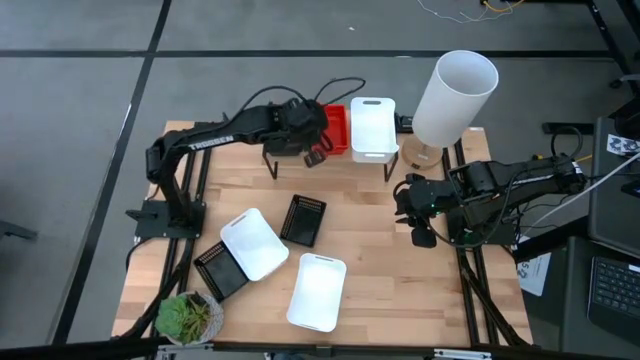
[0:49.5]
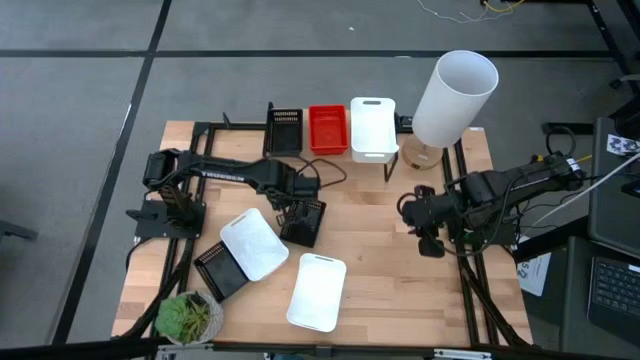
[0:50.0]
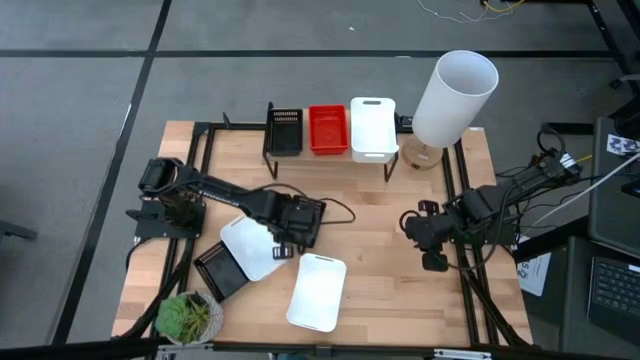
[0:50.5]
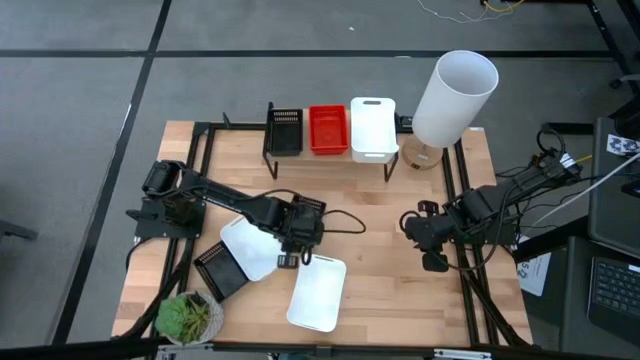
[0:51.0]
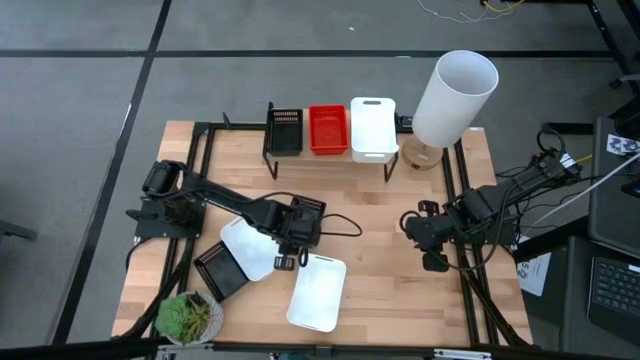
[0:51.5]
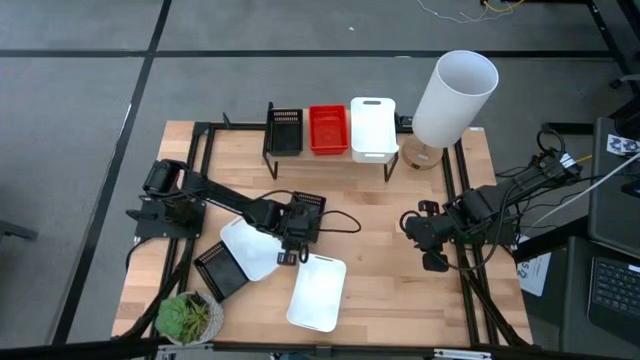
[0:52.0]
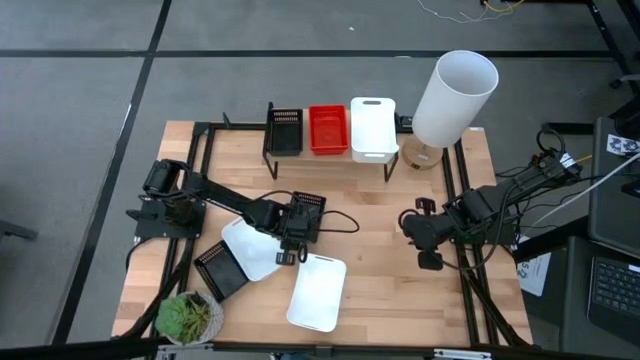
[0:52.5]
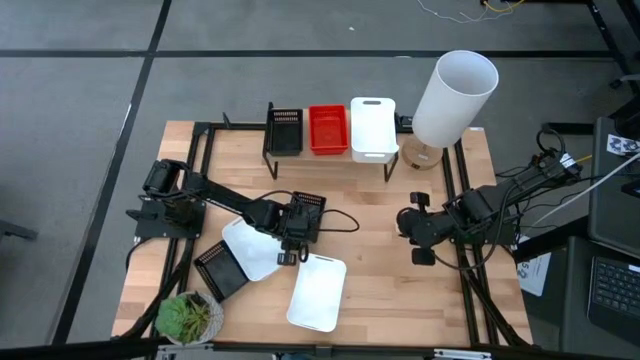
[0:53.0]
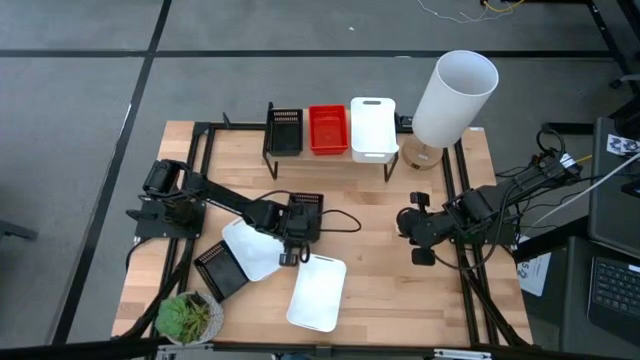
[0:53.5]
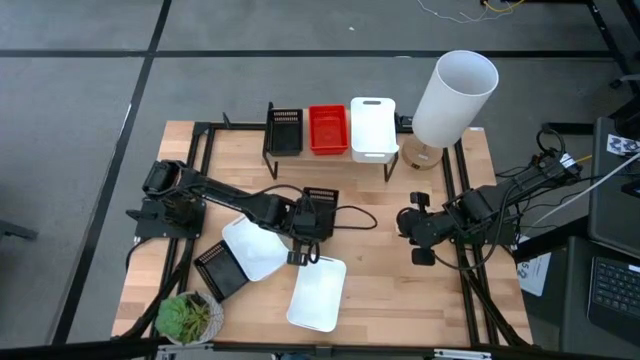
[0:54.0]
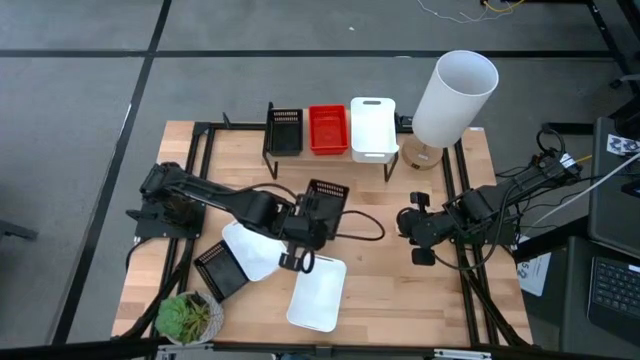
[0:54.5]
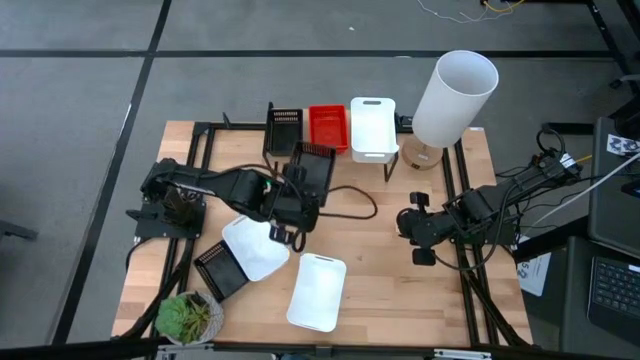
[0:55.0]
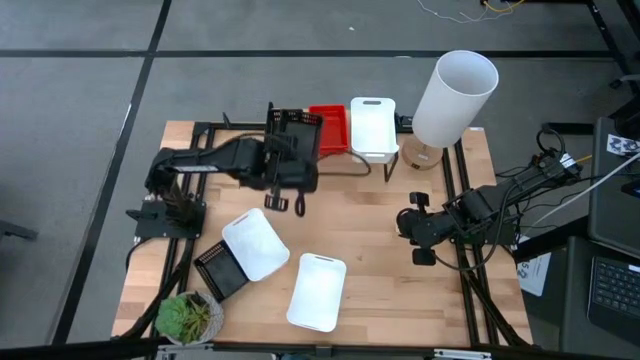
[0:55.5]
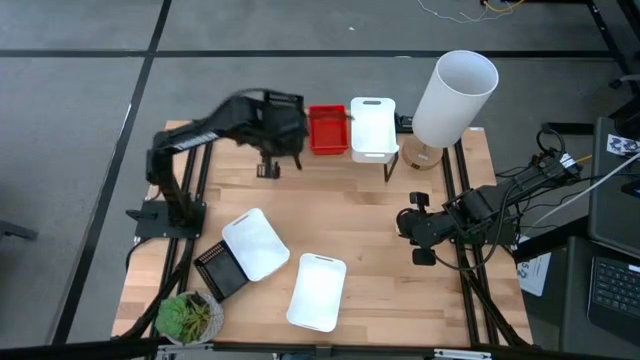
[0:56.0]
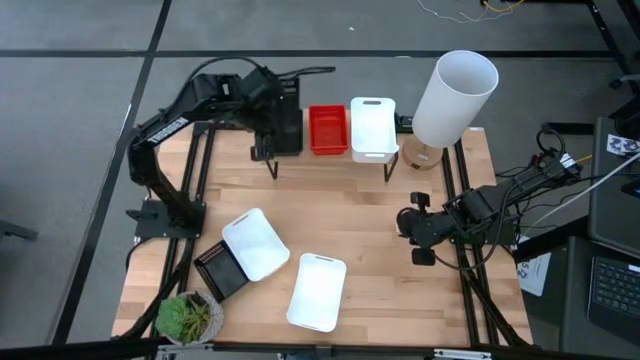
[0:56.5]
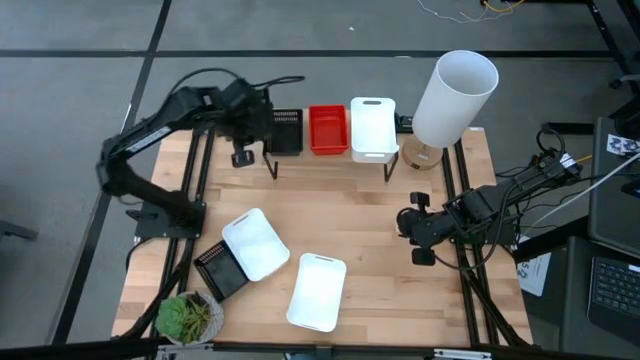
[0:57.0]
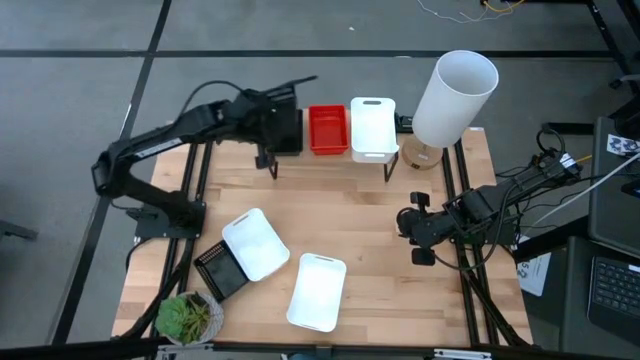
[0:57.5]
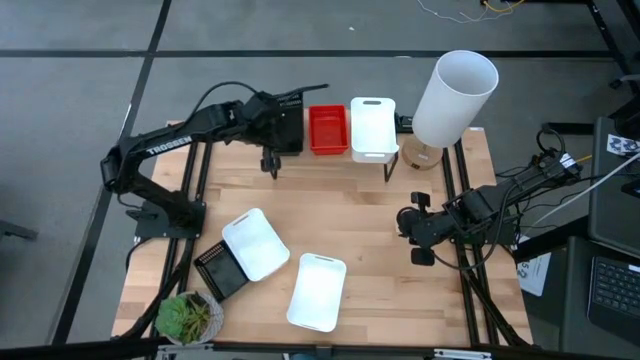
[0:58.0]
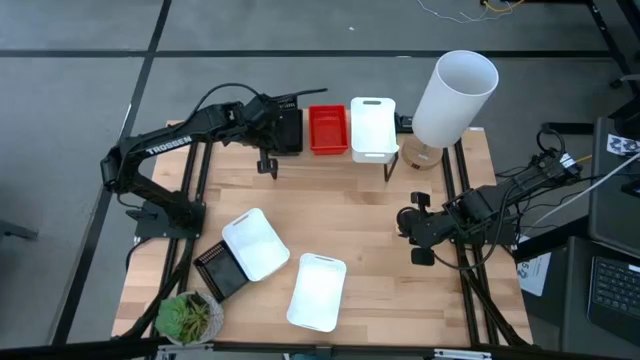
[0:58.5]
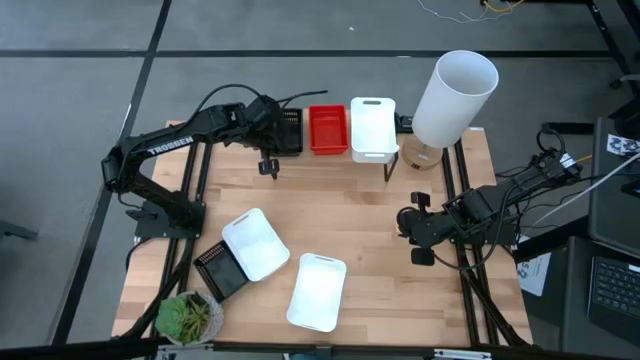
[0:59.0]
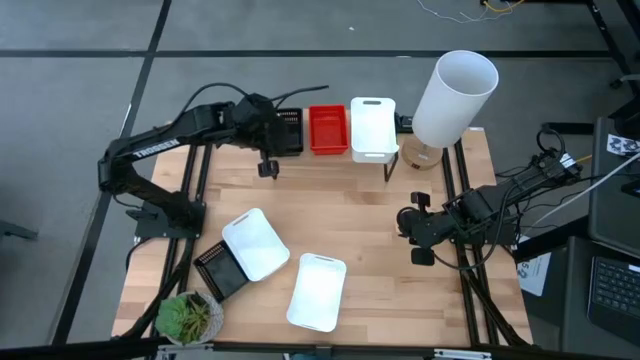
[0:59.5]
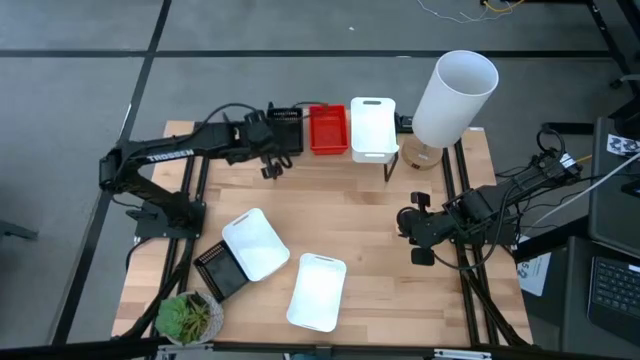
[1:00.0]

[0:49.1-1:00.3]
Task: Stack baskets on shelf by color
Stack the top black bin on top of the black bin on the shelf

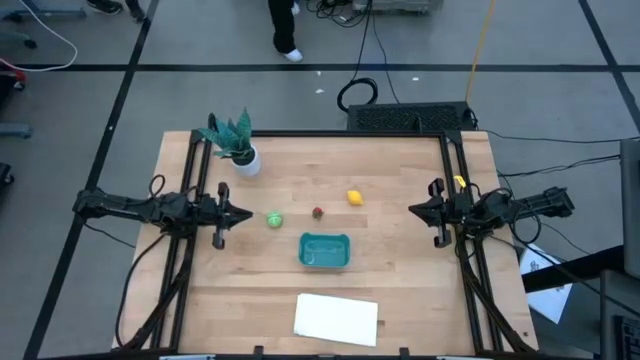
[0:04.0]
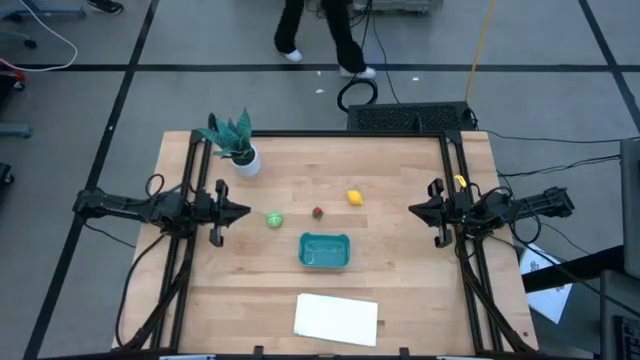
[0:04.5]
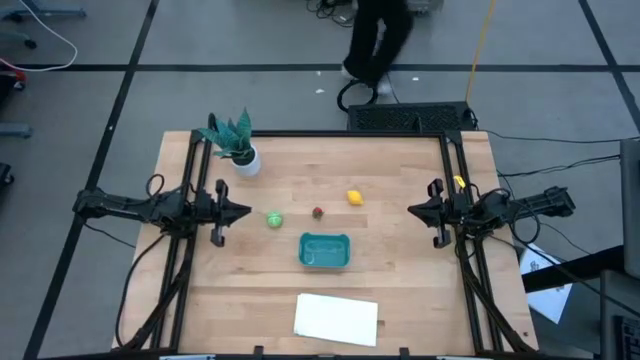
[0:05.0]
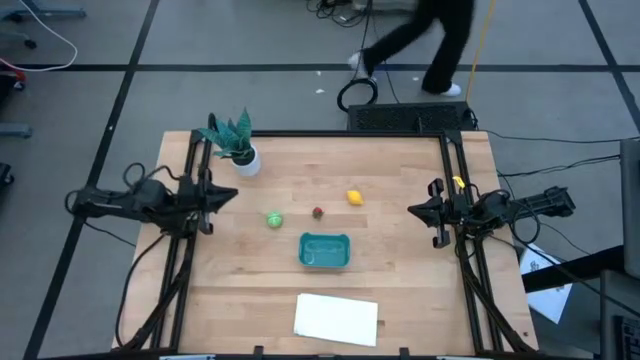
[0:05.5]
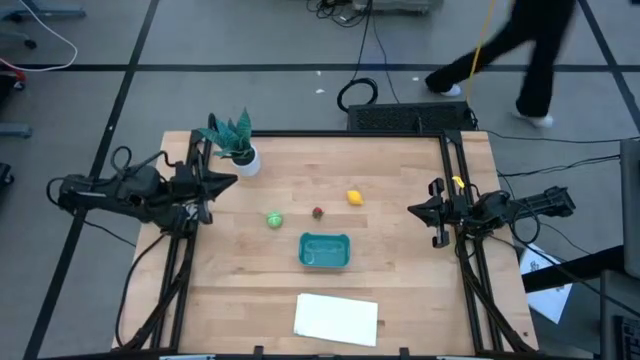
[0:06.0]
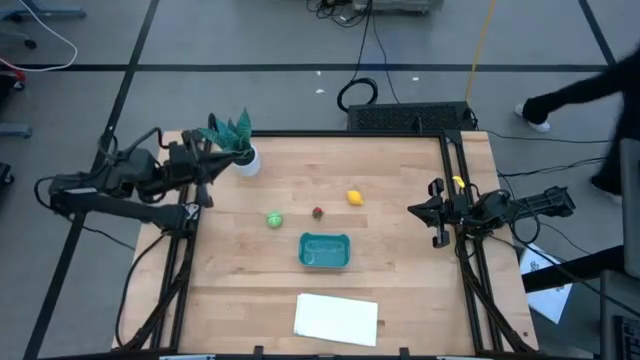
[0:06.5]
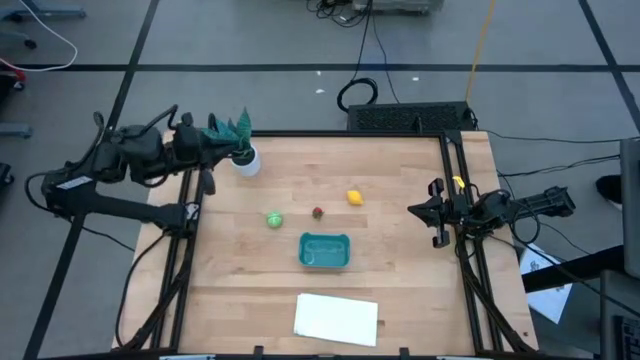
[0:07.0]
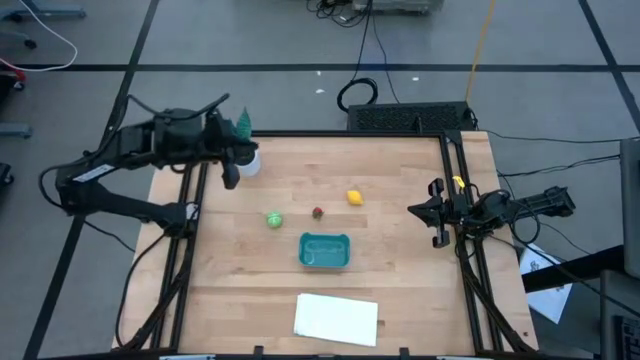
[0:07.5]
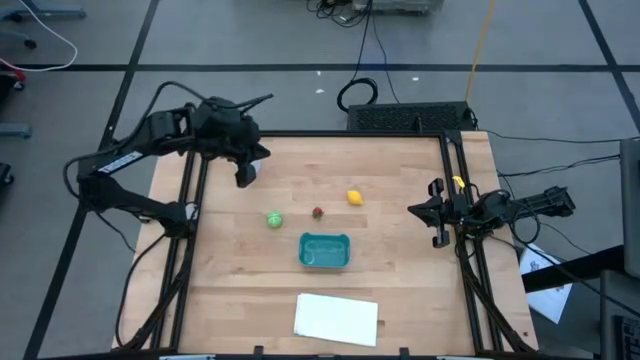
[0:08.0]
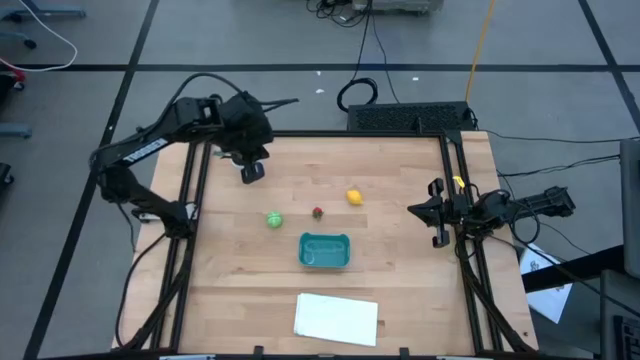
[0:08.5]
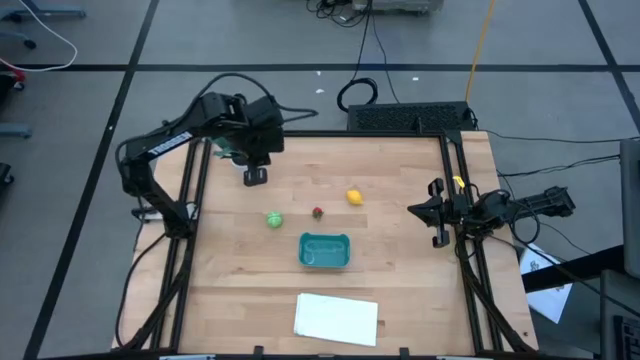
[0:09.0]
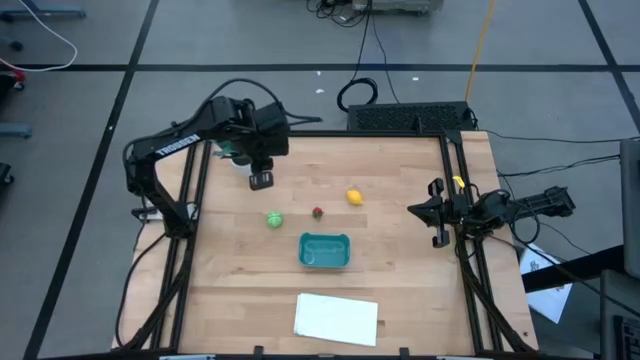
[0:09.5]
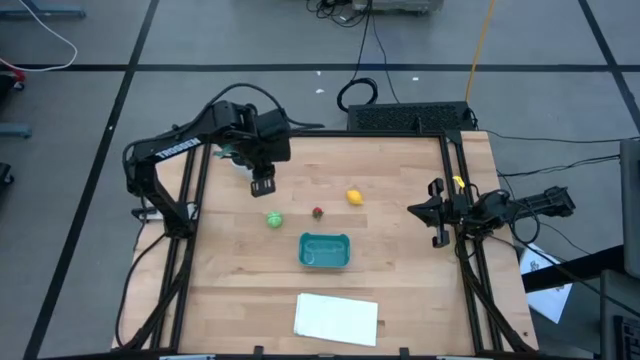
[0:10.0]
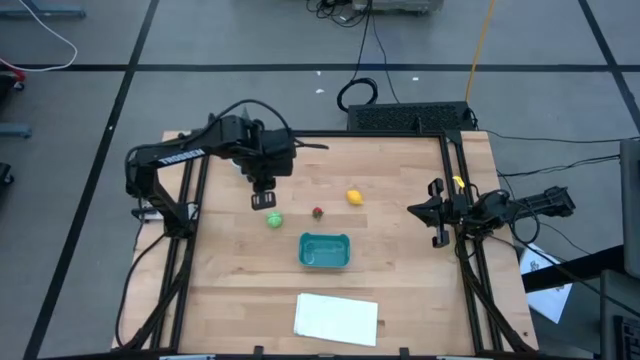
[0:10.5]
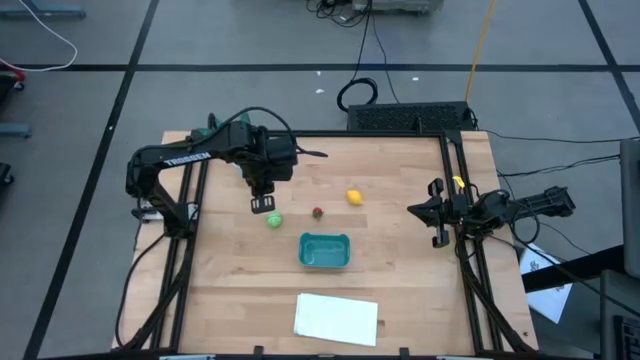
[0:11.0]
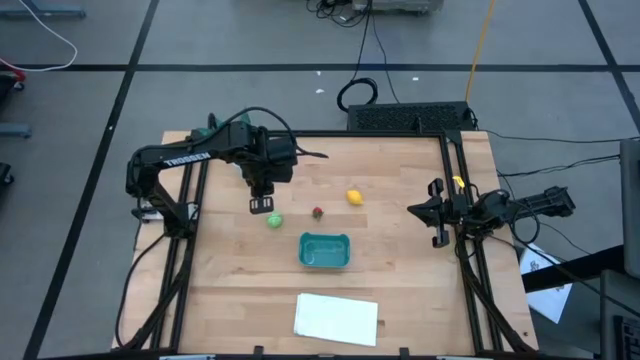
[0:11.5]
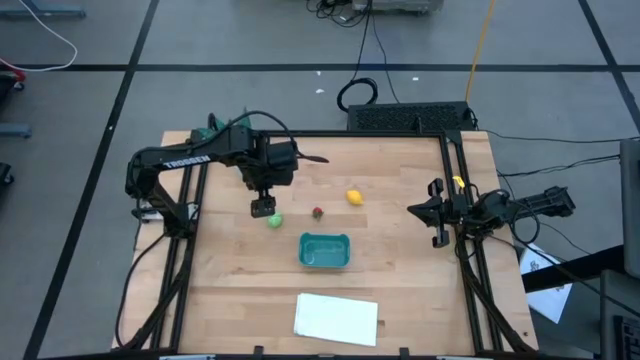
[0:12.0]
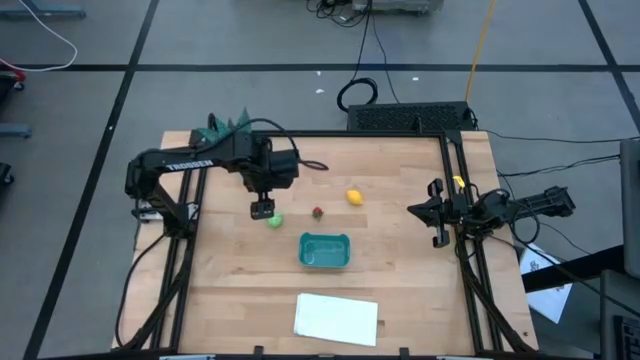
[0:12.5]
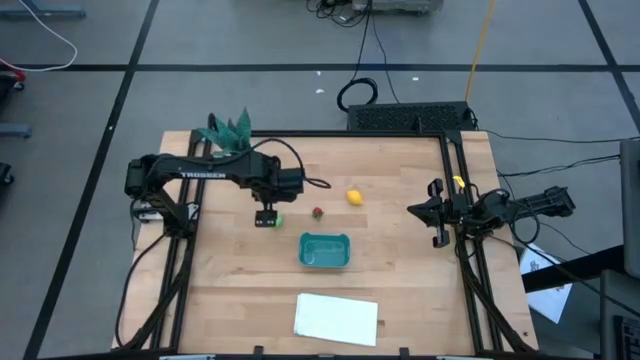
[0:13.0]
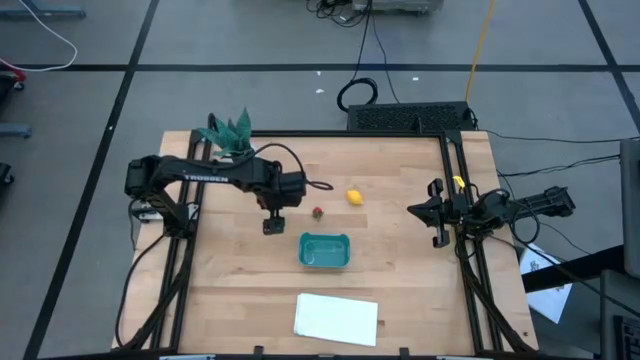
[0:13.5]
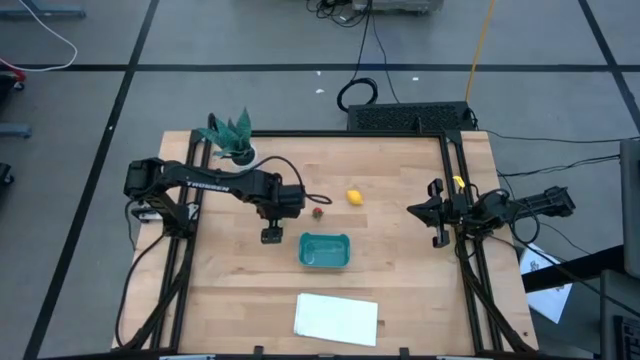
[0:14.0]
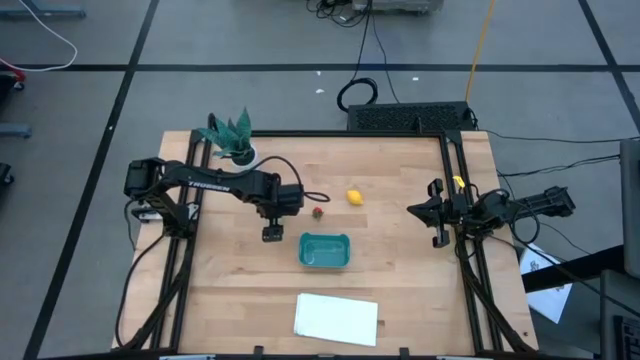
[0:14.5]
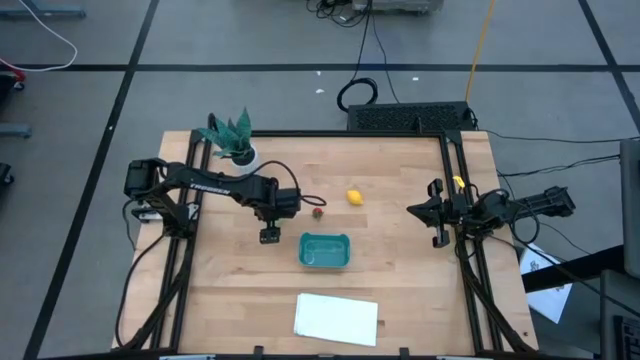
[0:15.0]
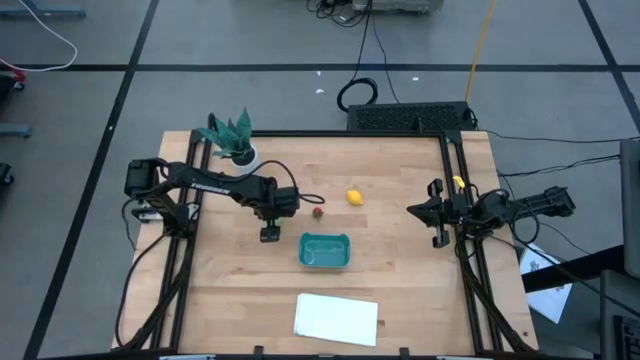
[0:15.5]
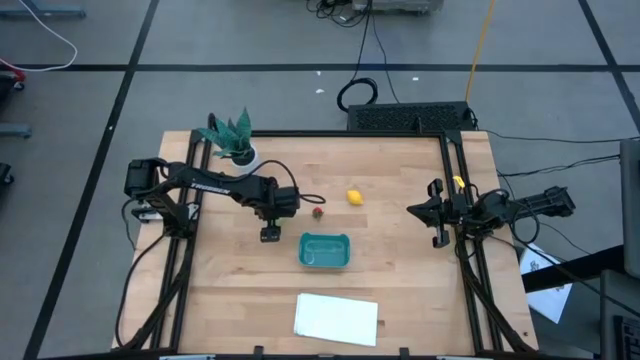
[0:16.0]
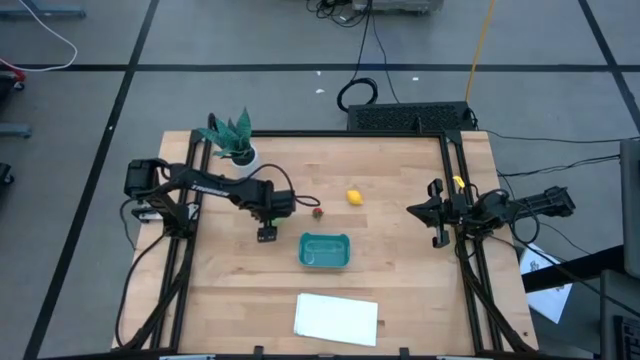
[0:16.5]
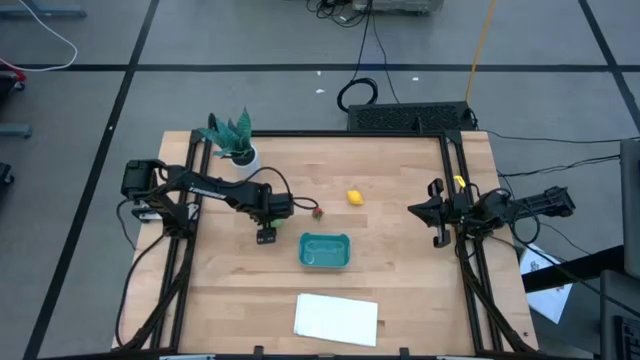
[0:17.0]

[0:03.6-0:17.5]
Task: Pick and placing Produce into tupperware
Put the cabbage into the blue bin
